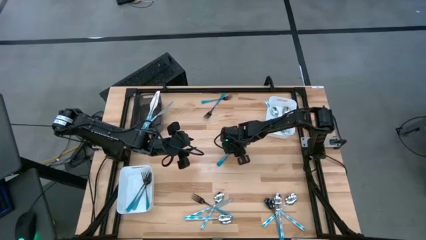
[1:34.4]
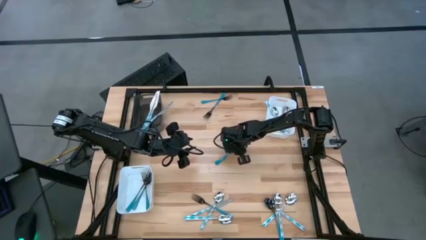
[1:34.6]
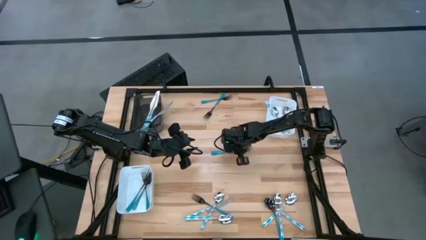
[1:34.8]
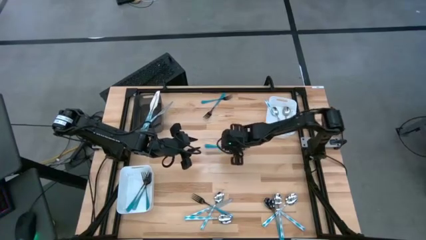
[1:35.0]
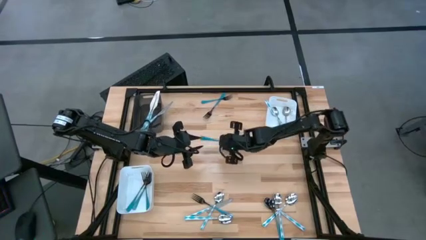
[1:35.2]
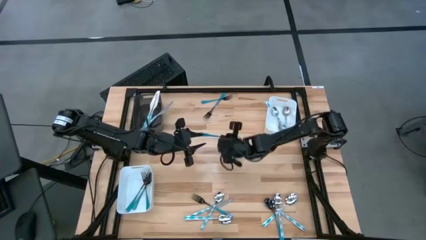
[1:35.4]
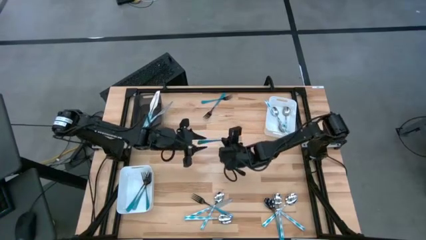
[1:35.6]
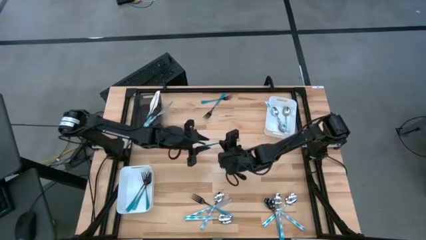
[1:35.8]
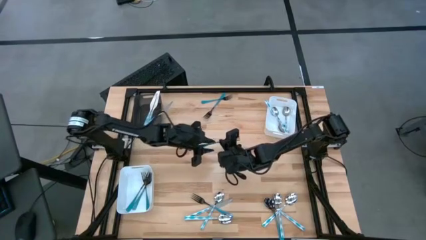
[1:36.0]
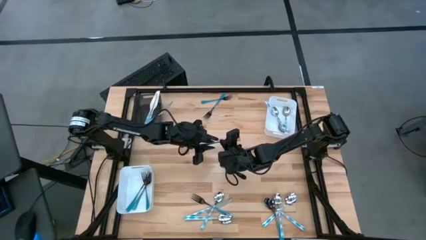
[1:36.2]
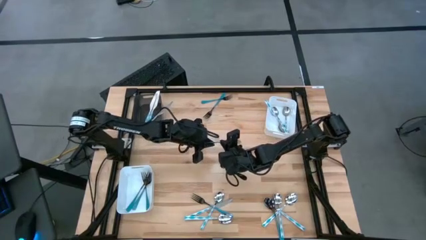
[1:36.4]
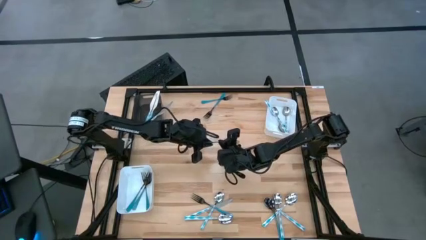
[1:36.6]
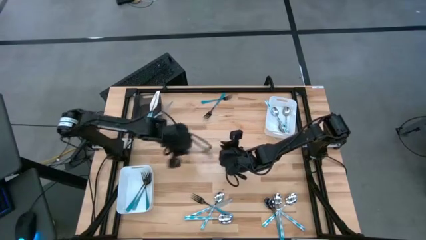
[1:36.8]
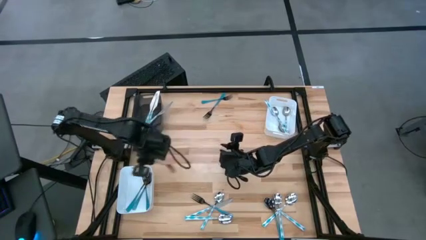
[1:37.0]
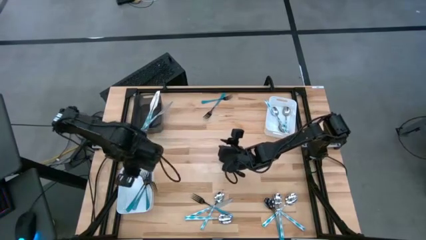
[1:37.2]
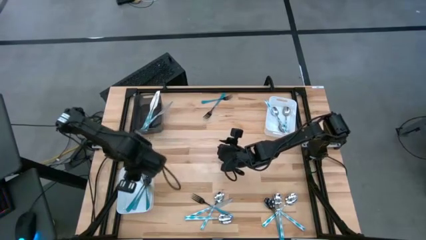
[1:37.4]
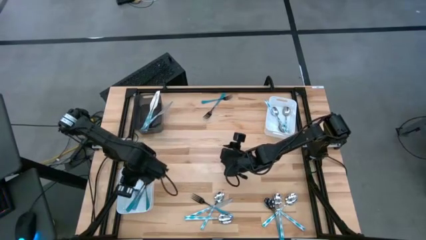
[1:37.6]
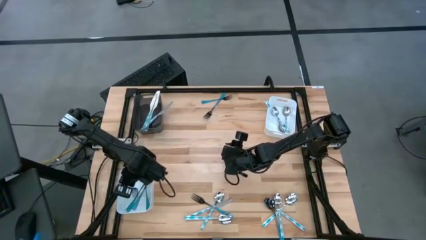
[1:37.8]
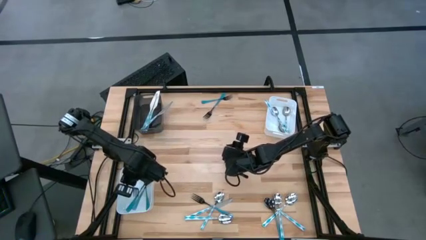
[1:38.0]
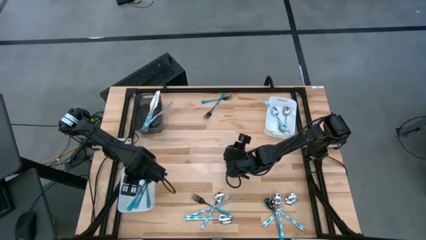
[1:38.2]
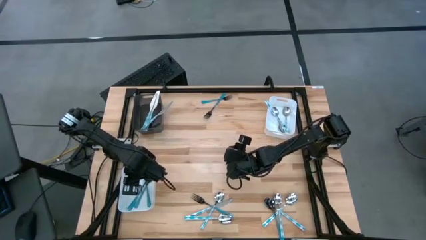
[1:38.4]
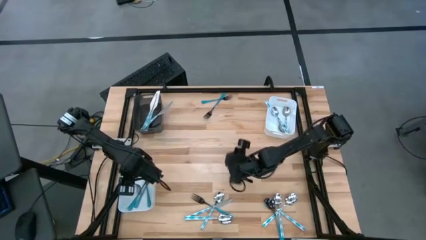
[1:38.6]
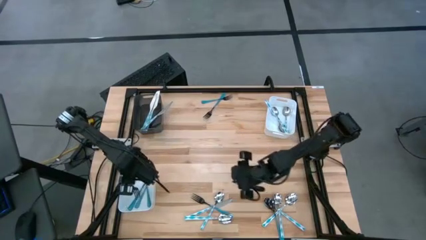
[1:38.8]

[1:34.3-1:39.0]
Task: Sort silverware by color (type)
Put the blue fork into the left white bin

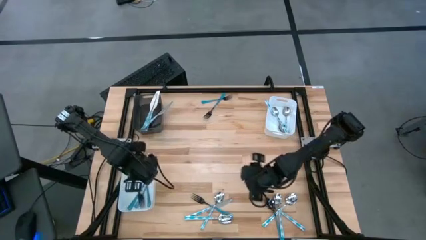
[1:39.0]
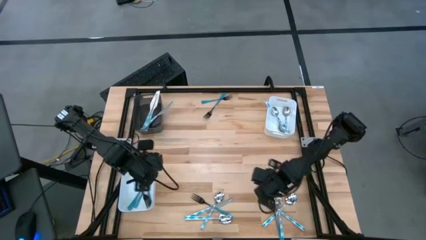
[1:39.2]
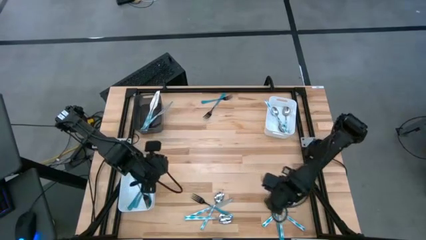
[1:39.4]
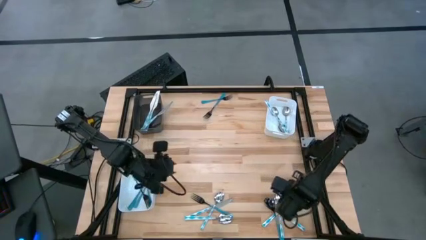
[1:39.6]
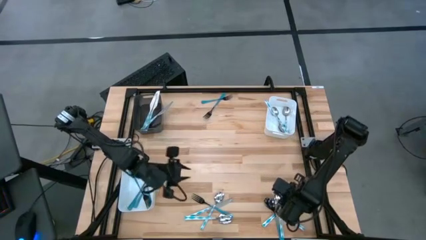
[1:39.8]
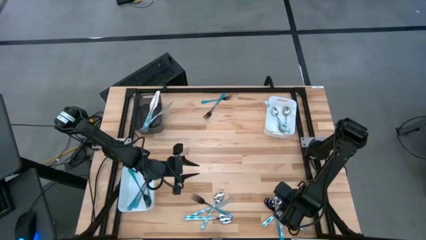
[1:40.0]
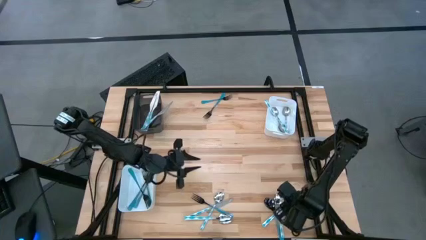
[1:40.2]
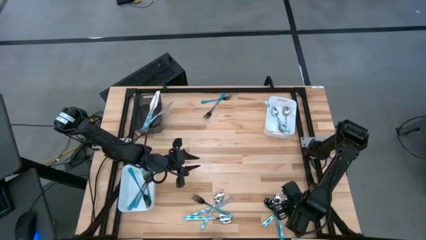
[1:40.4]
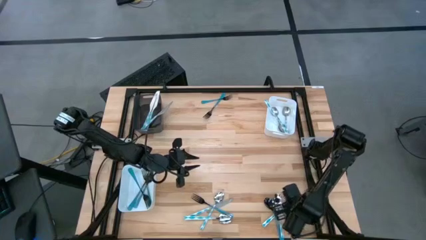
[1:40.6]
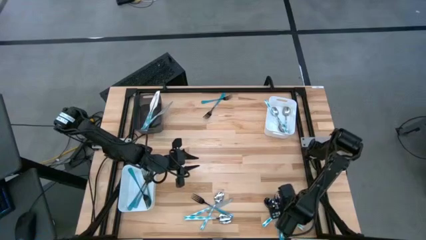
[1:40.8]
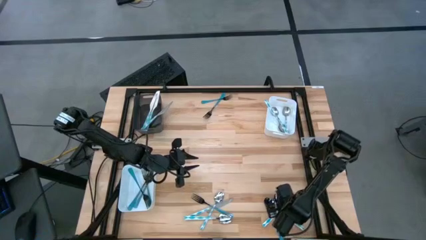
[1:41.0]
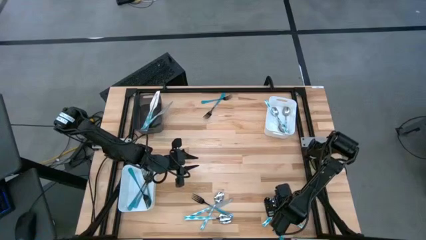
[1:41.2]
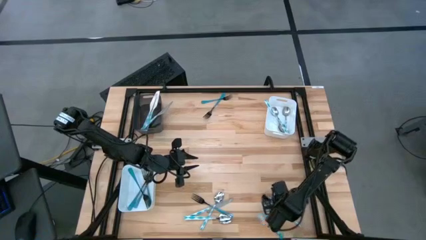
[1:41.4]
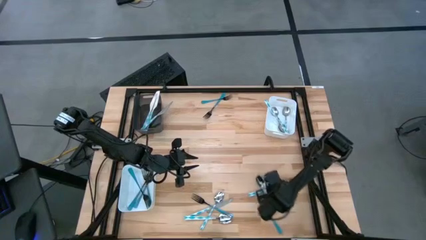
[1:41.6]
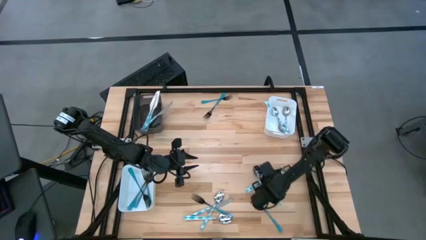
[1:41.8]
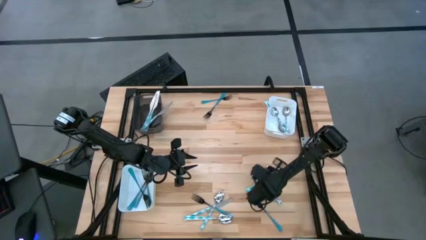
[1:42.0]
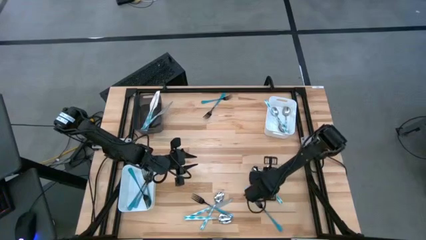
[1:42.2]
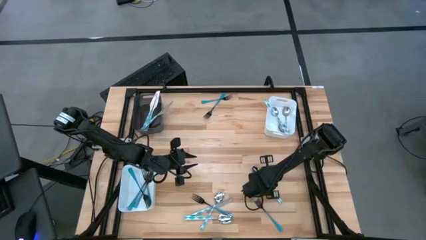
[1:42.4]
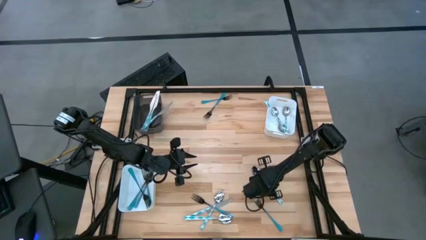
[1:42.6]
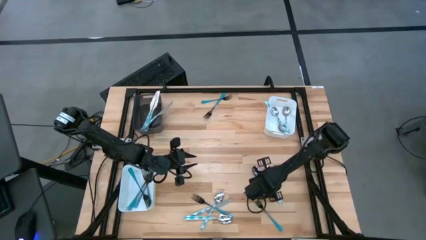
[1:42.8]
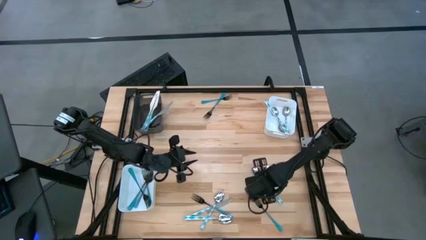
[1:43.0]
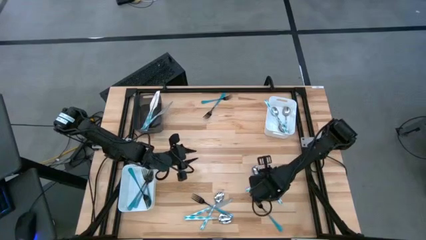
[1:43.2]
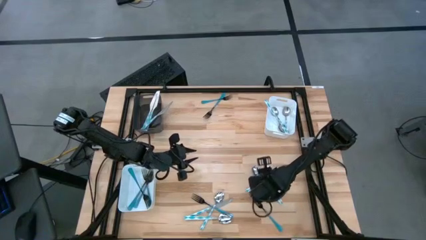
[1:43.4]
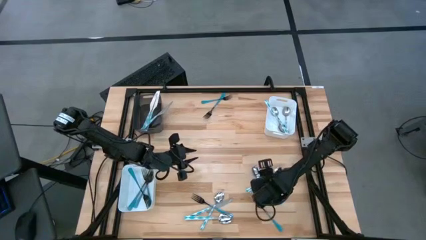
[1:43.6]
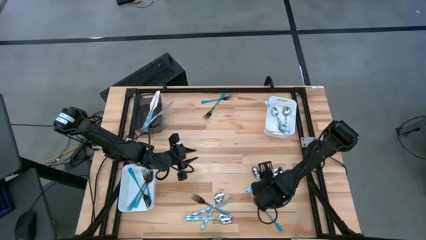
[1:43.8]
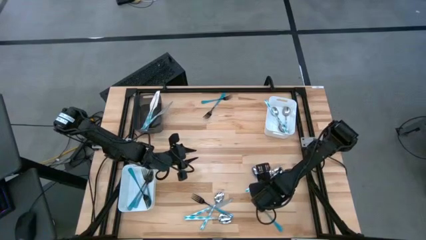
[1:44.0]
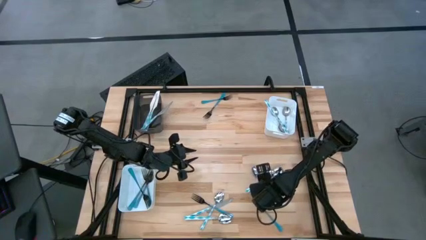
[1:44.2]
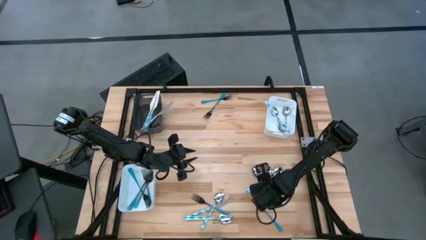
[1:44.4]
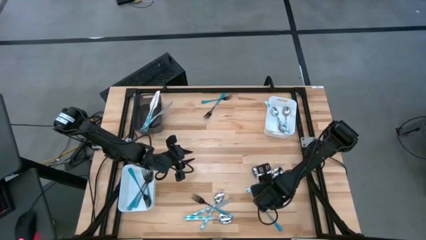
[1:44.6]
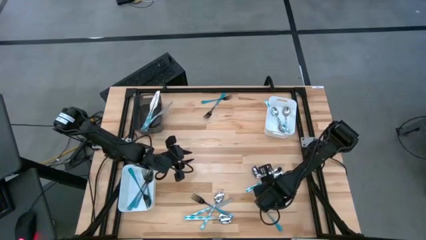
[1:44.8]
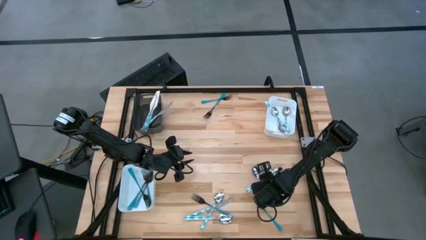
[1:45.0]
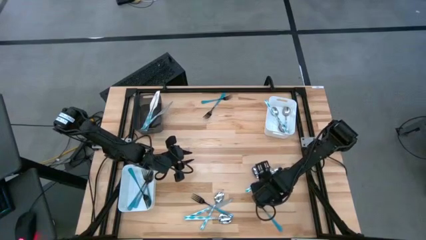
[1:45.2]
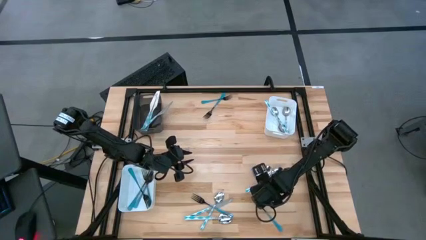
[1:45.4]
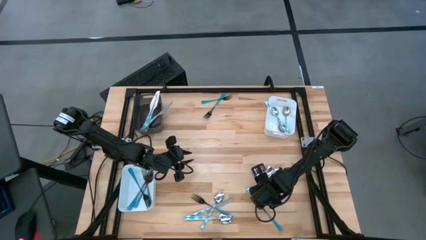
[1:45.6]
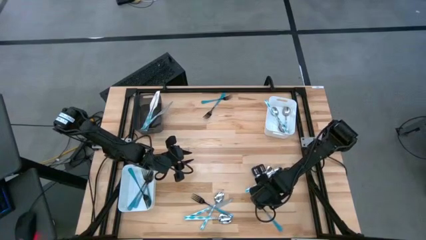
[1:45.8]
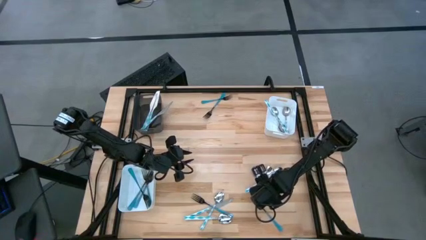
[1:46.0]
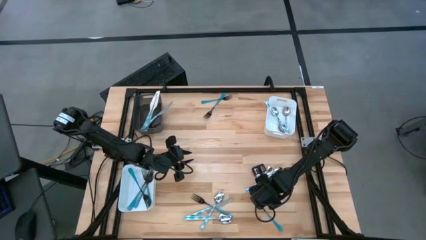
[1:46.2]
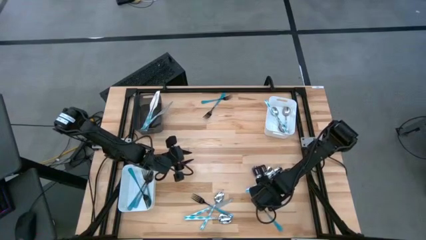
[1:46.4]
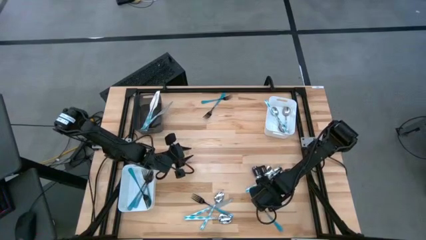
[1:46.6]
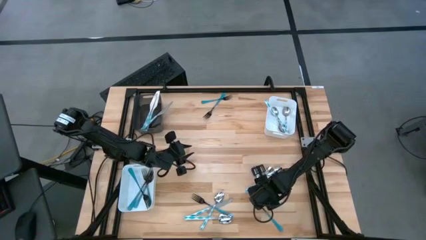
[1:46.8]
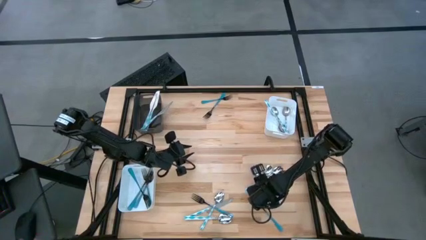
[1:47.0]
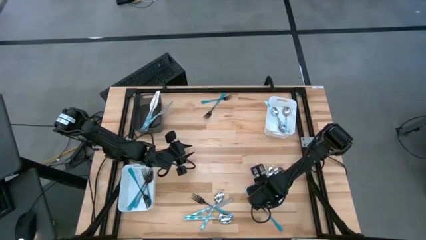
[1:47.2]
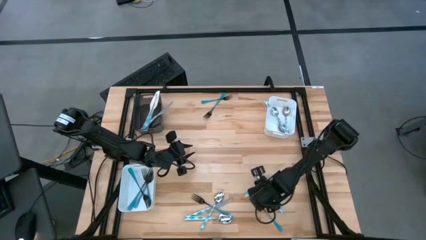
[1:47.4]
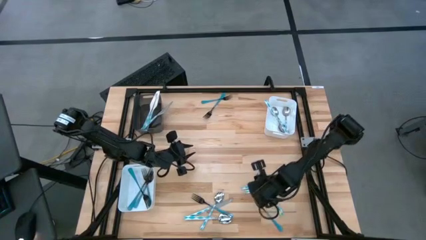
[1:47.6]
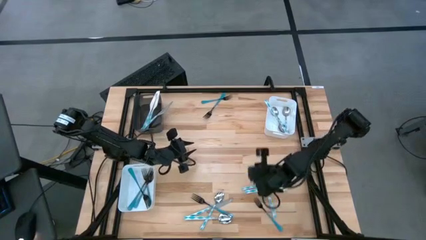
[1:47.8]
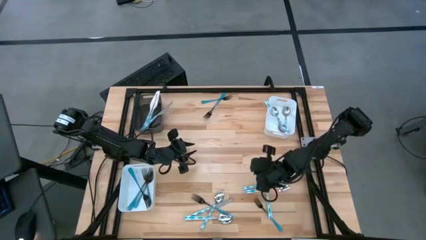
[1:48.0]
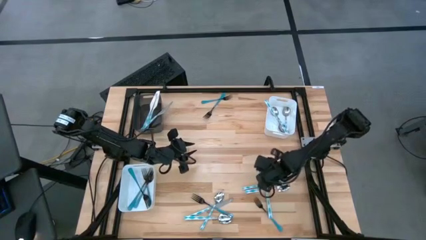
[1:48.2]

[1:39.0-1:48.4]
Put the blue white spoon into the right white bin

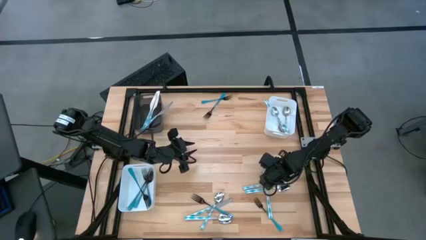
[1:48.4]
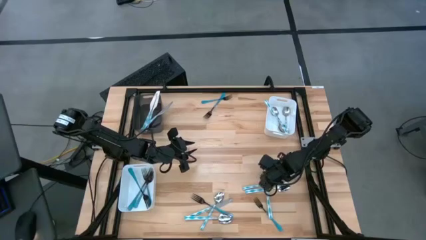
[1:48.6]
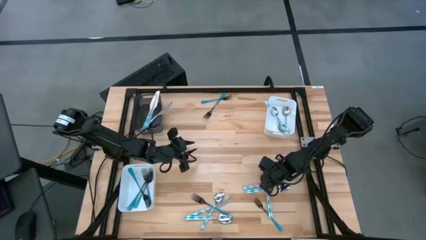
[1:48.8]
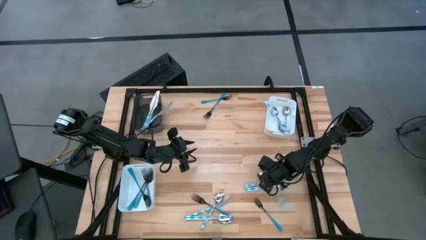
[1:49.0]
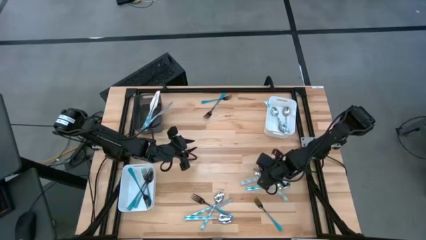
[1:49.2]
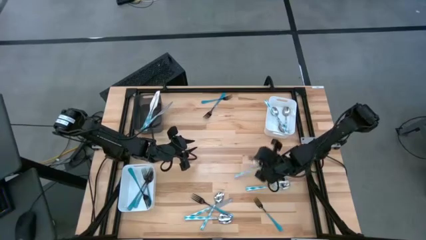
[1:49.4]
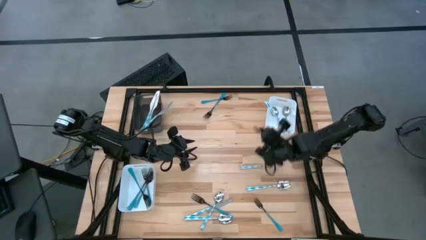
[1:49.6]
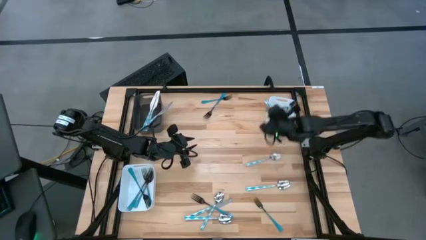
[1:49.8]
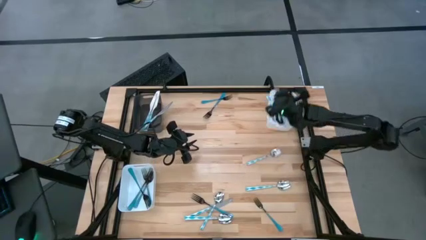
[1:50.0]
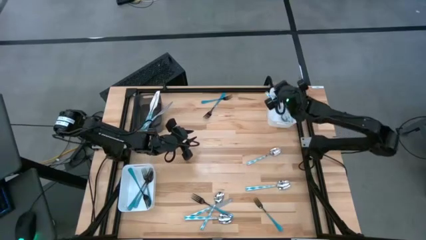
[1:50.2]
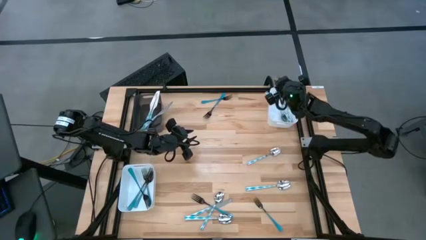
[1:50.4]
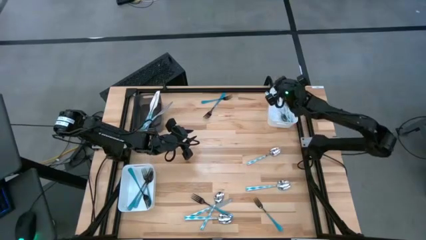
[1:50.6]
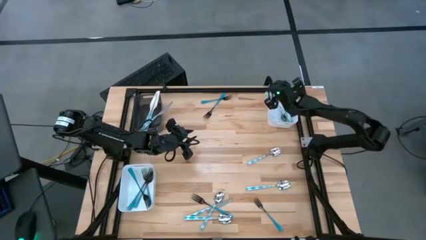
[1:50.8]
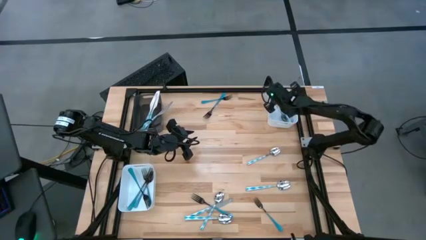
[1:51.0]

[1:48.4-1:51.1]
Put the blue white spoon into the right white bin

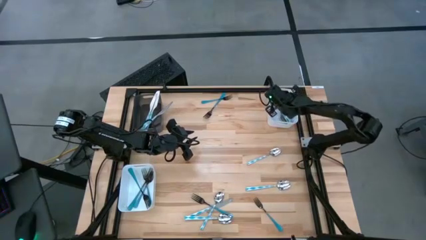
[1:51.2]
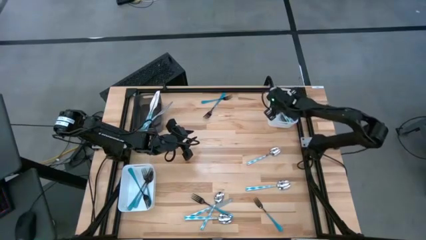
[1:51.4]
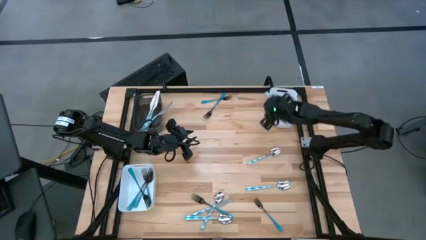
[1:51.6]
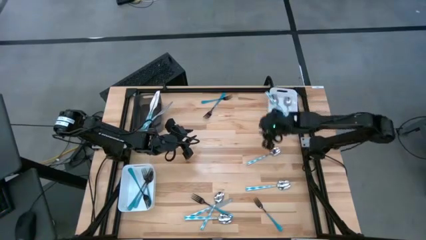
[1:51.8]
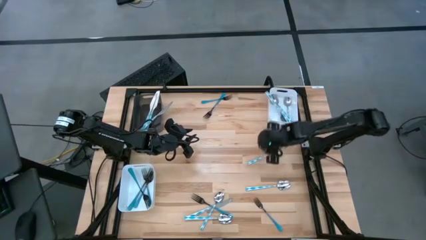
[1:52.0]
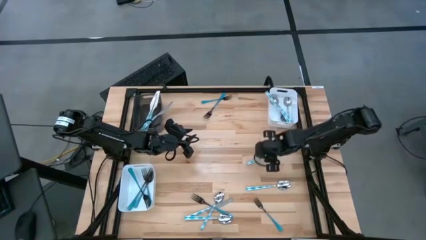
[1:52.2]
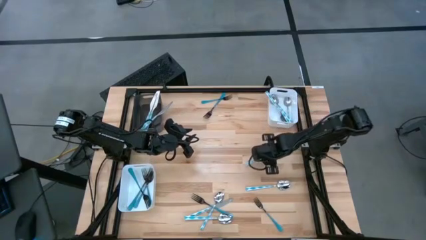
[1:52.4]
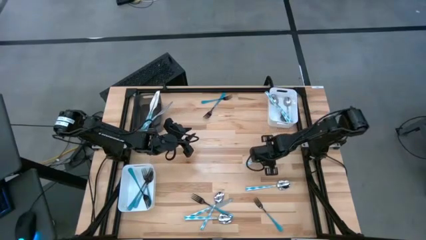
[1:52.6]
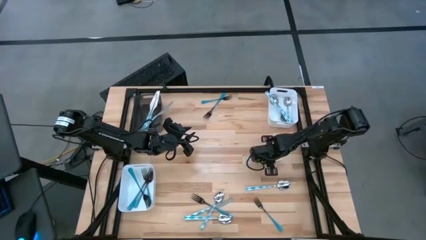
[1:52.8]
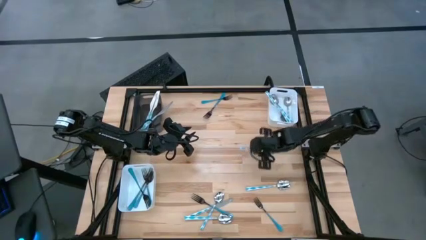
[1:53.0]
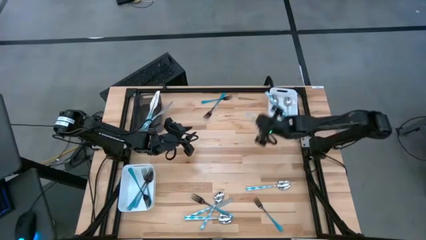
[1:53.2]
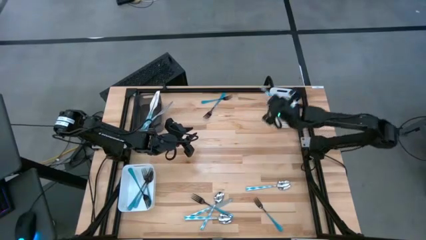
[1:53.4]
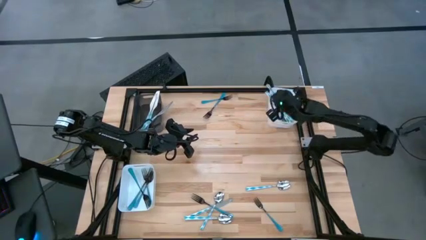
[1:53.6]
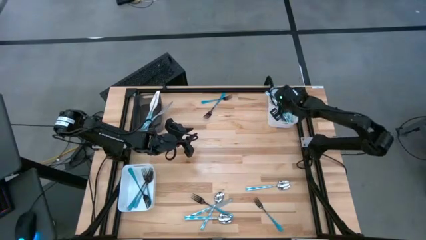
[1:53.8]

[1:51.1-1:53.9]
Put the blue white spoon into the right white bin
